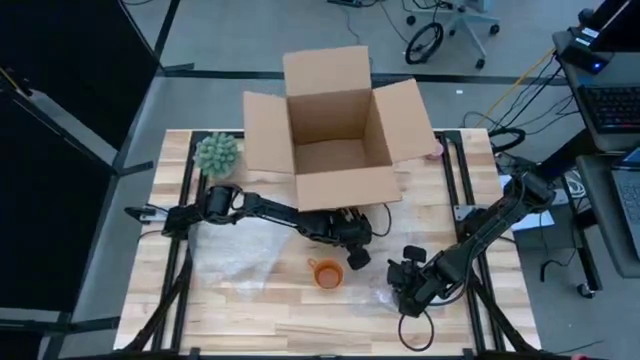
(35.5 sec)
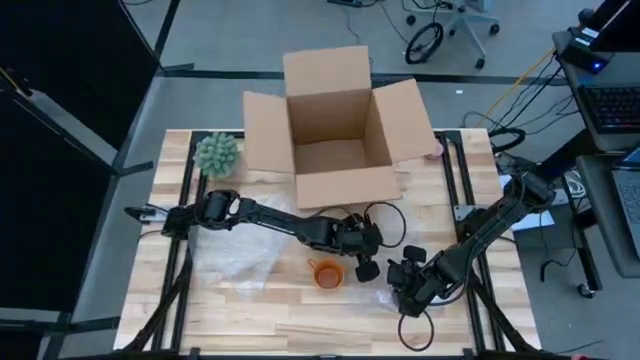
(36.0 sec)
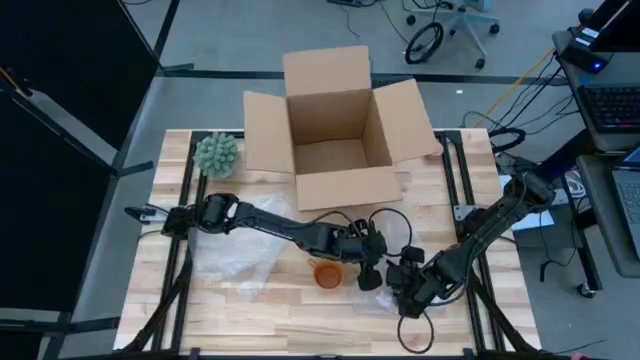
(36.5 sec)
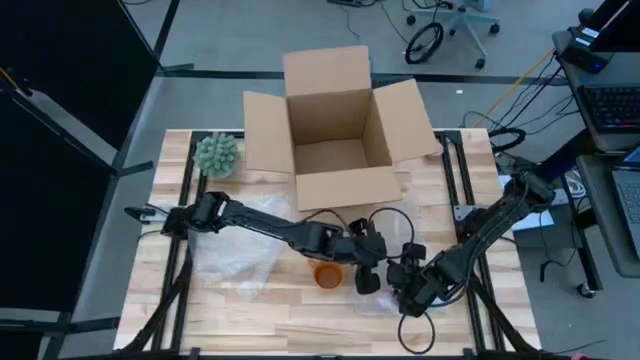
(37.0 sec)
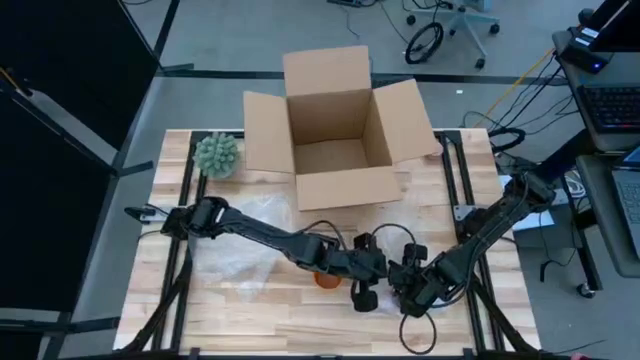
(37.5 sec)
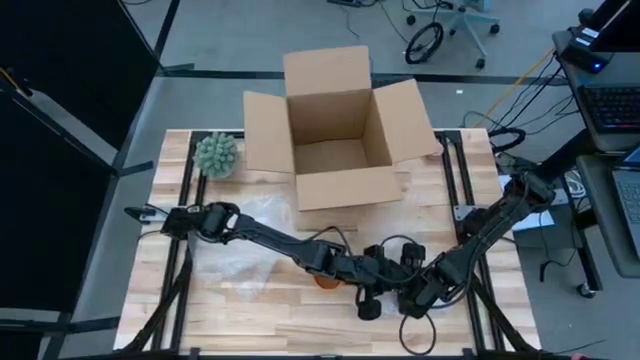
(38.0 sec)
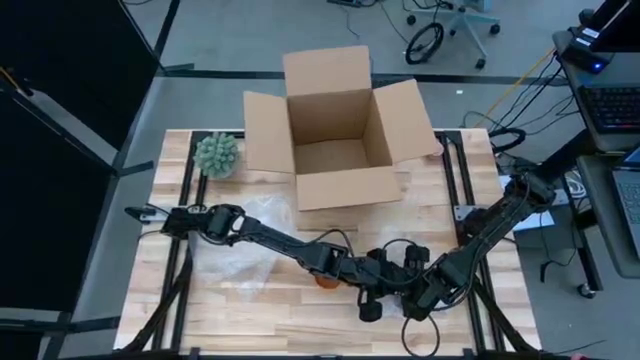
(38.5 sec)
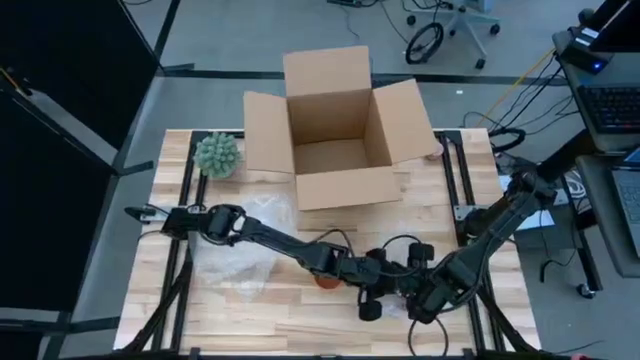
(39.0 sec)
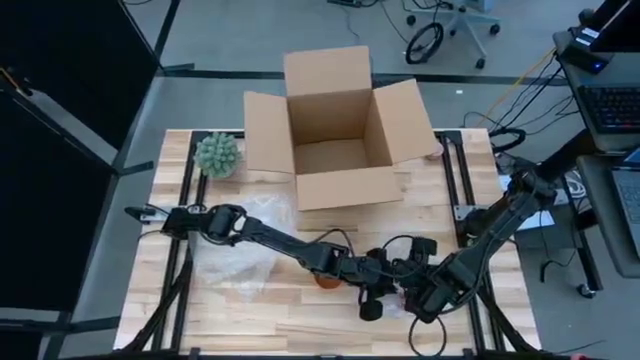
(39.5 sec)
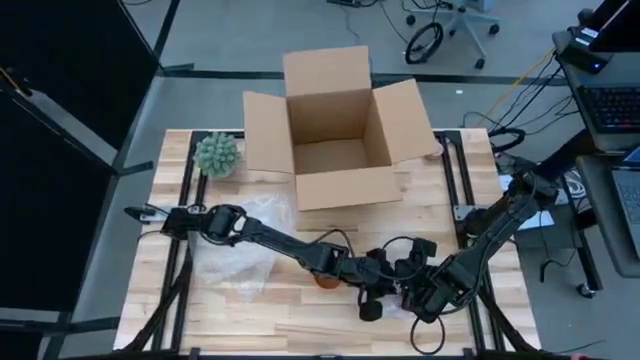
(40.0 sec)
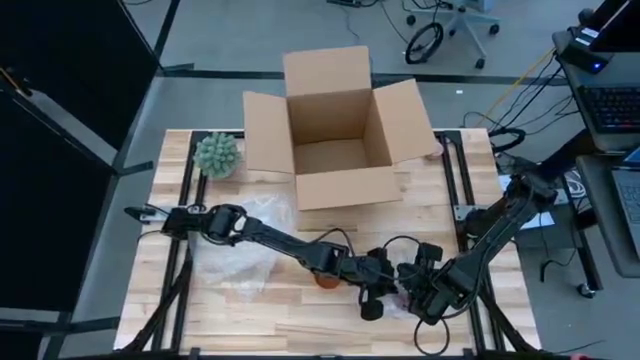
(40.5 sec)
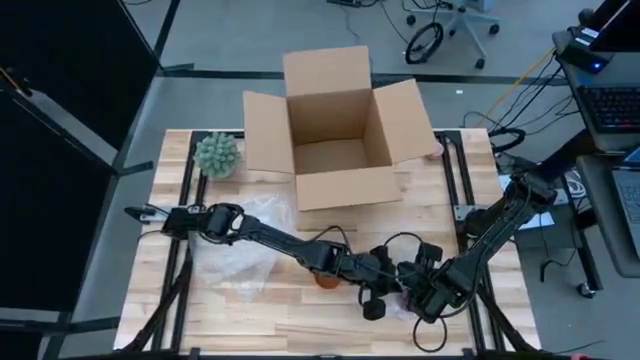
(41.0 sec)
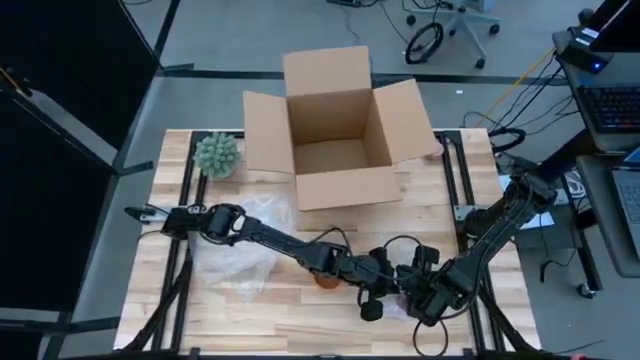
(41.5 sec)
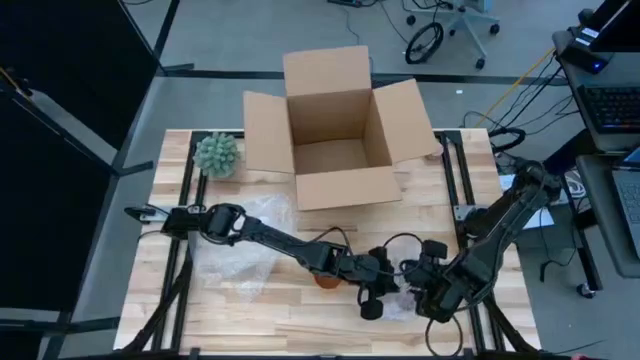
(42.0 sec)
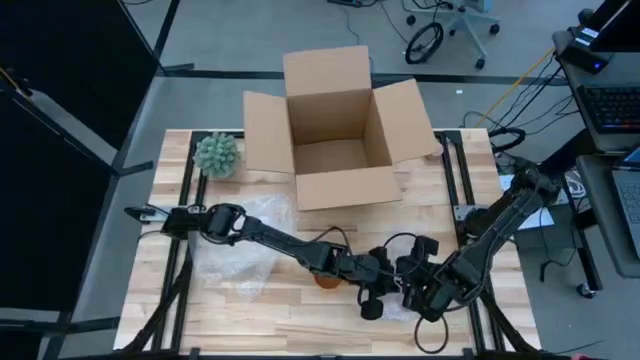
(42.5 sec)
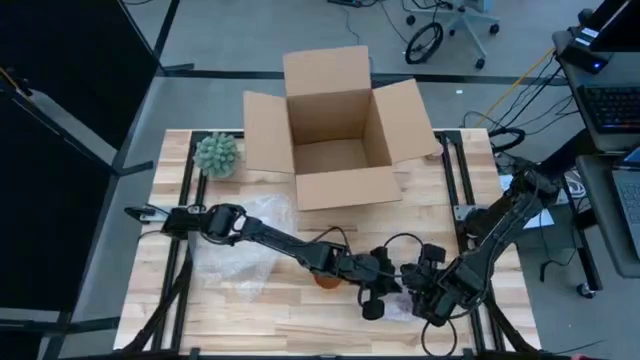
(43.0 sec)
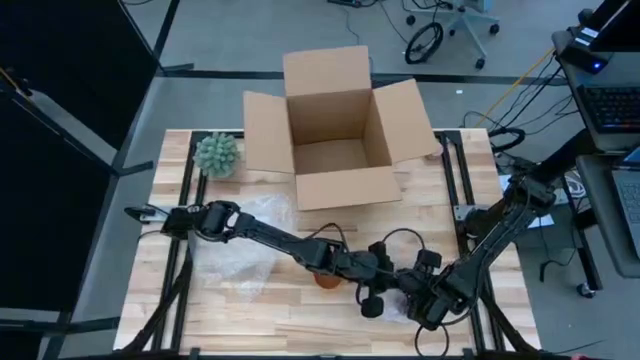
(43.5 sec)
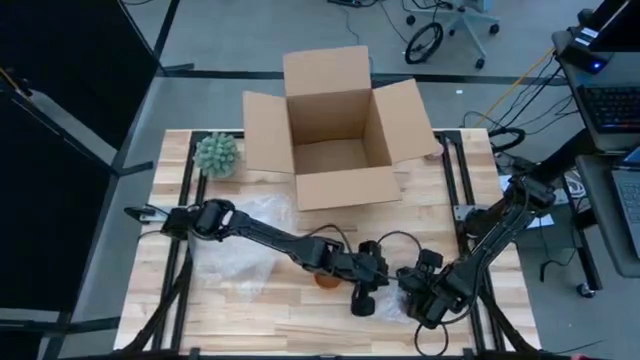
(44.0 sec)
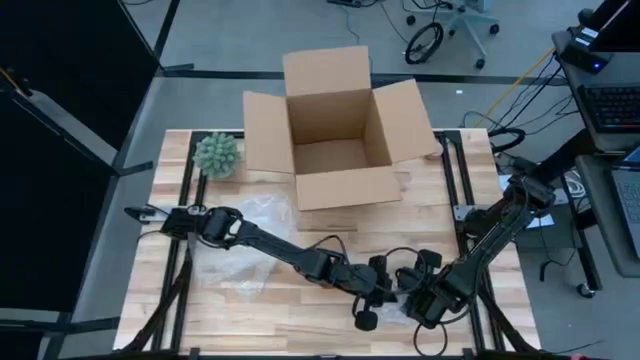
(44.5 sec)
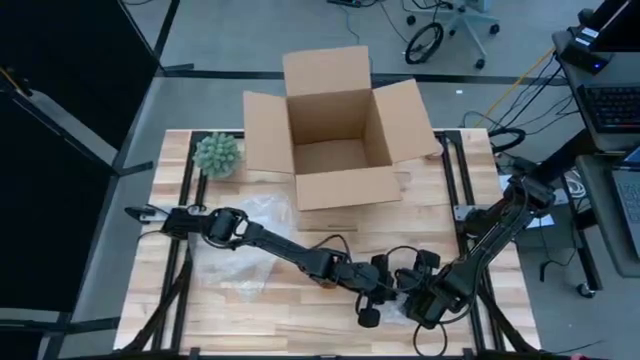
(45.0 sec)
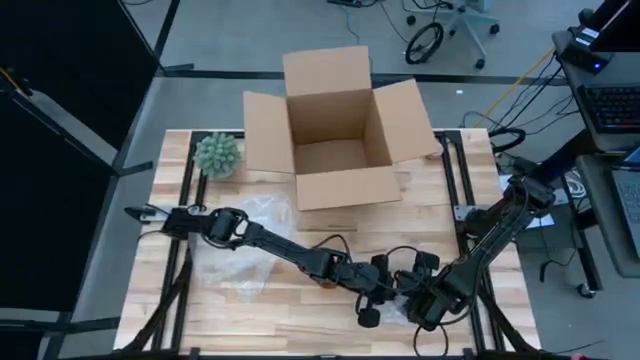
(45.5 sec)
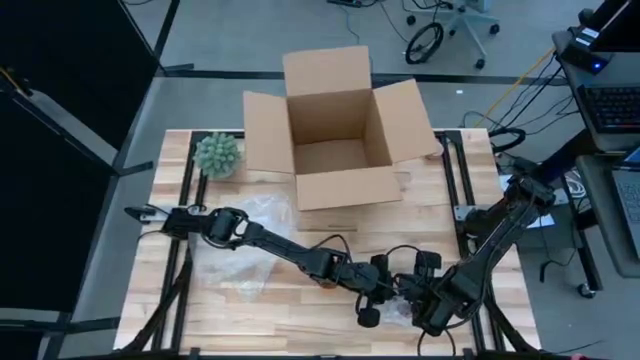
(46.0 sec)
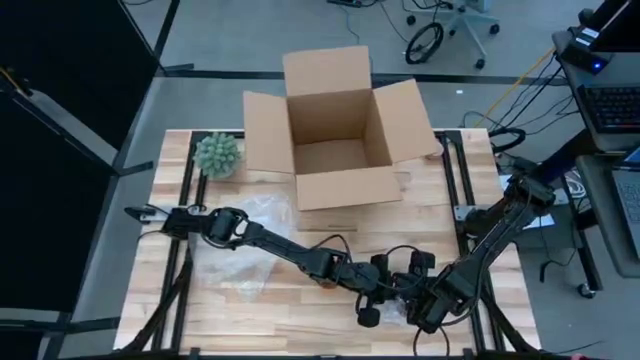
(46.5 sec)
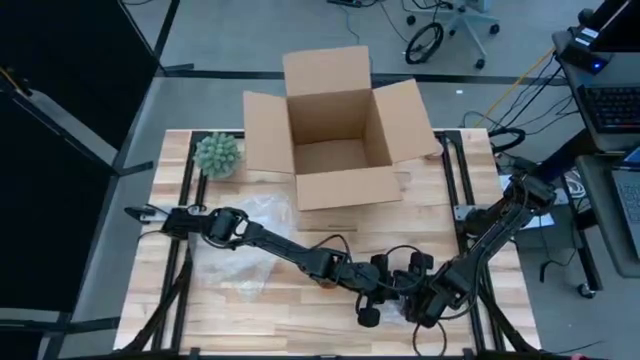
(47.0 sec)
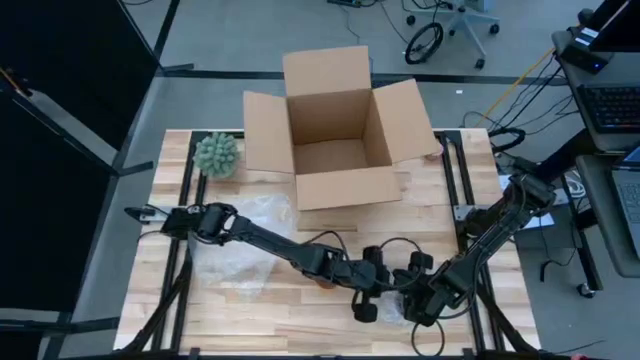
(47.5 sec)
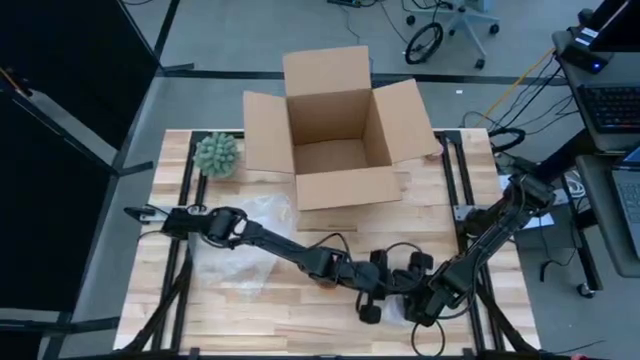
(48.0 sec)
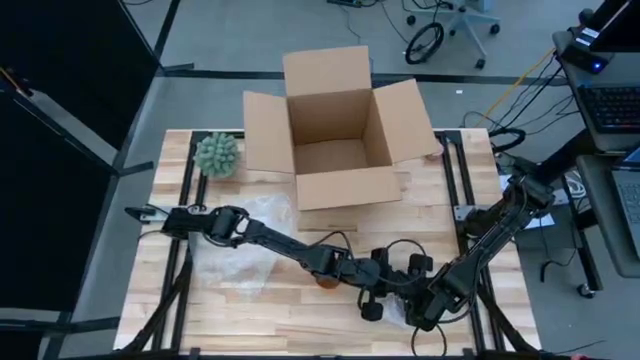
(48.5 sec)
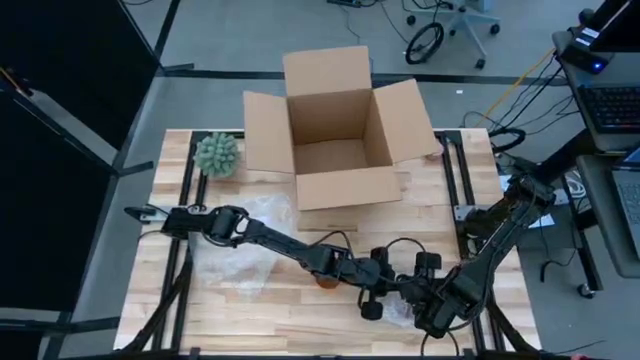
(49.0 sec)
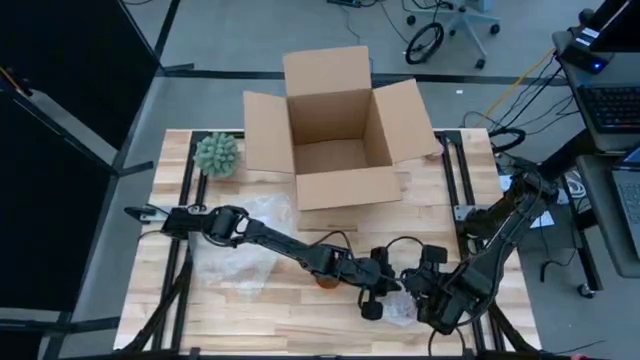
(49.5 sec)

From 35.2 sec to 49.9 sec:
Task: wrap mug
Wrap the pink mug with the right bubble wrap

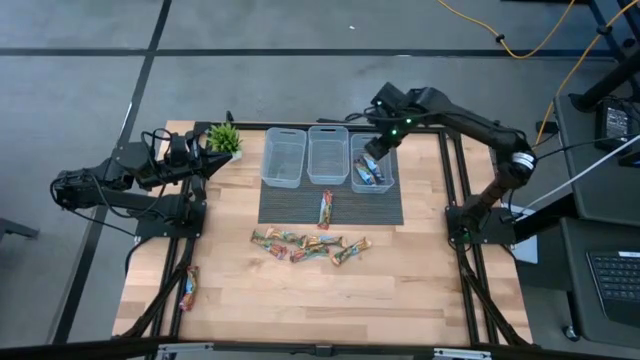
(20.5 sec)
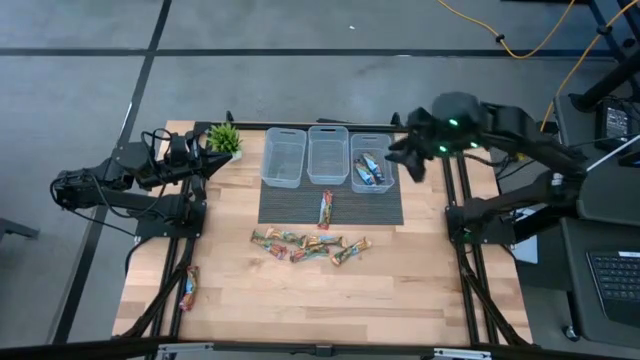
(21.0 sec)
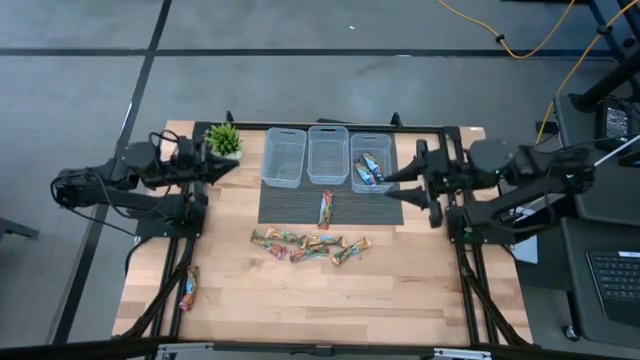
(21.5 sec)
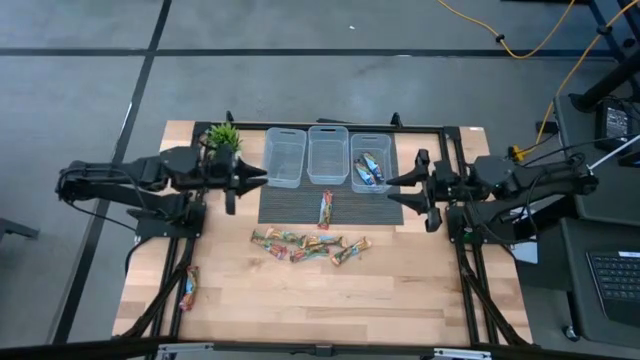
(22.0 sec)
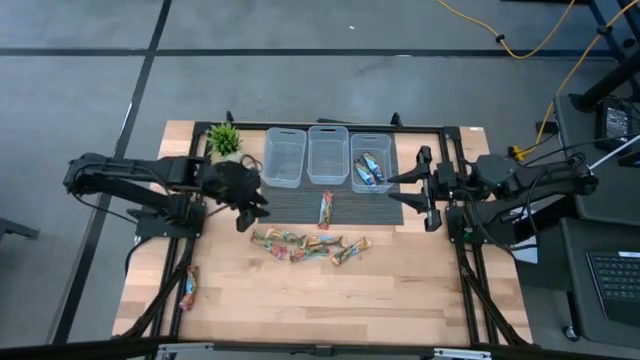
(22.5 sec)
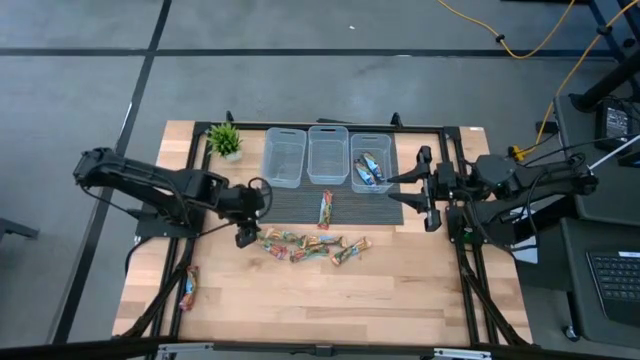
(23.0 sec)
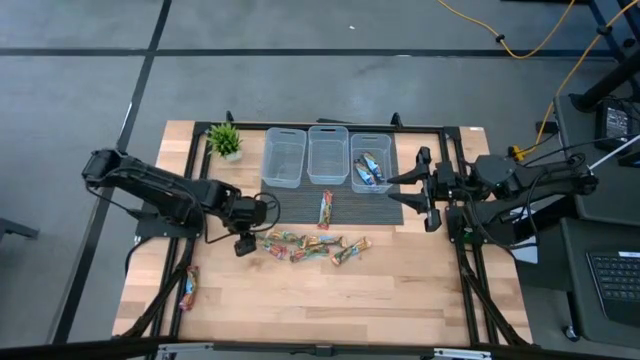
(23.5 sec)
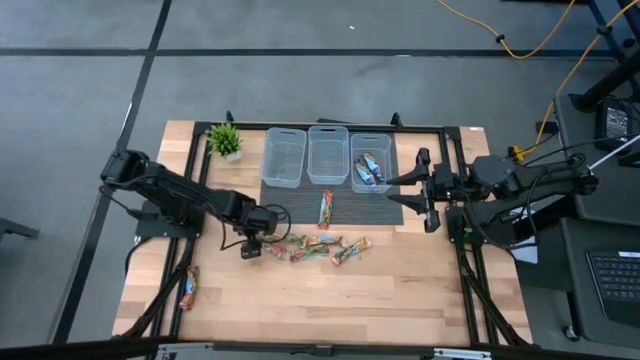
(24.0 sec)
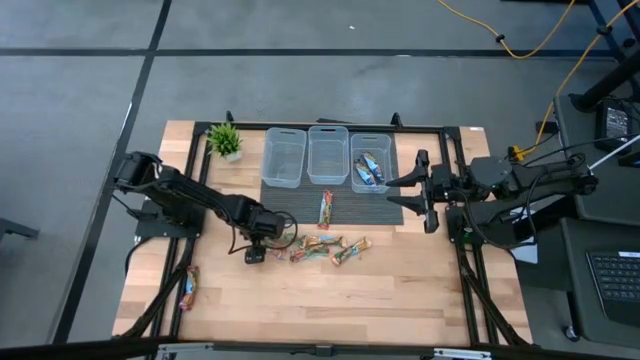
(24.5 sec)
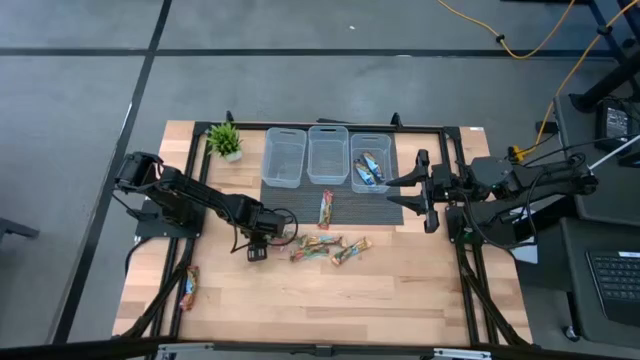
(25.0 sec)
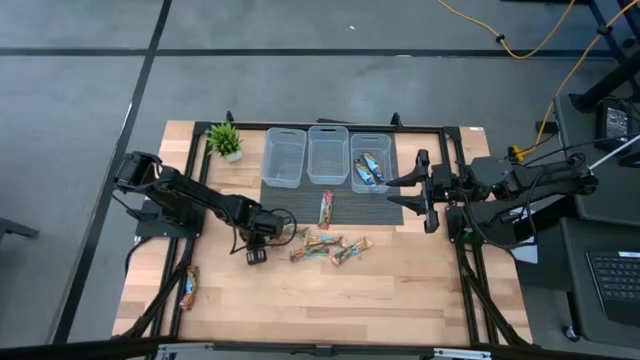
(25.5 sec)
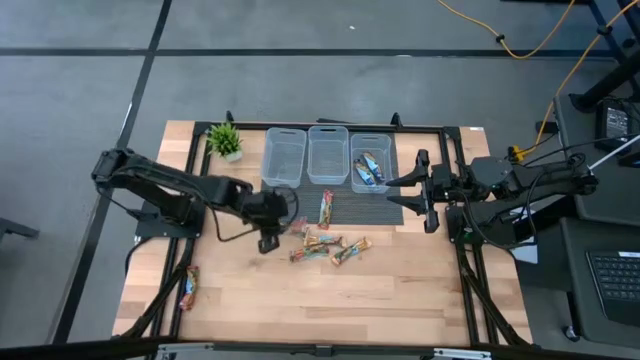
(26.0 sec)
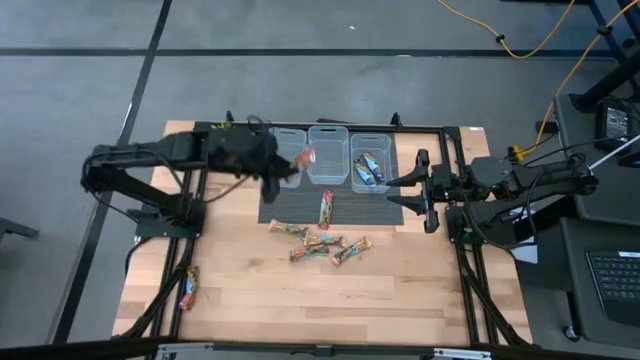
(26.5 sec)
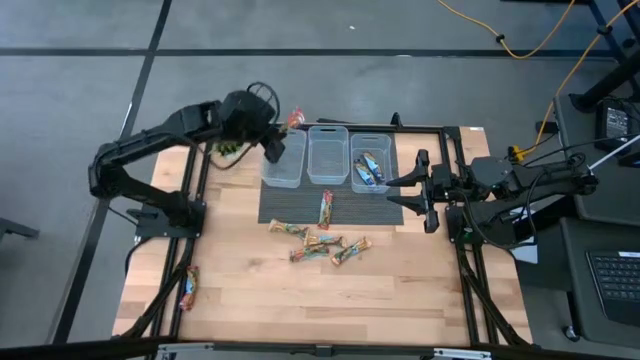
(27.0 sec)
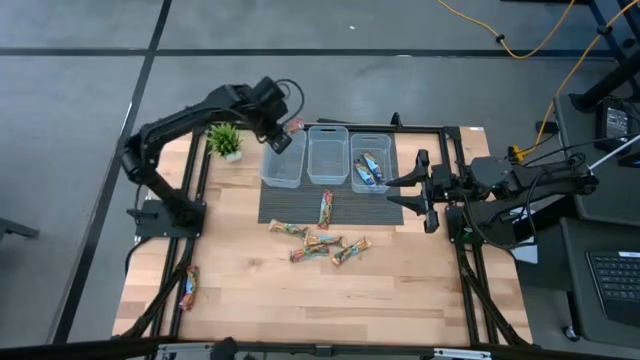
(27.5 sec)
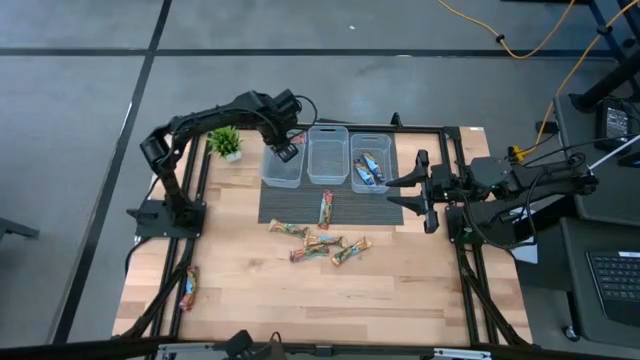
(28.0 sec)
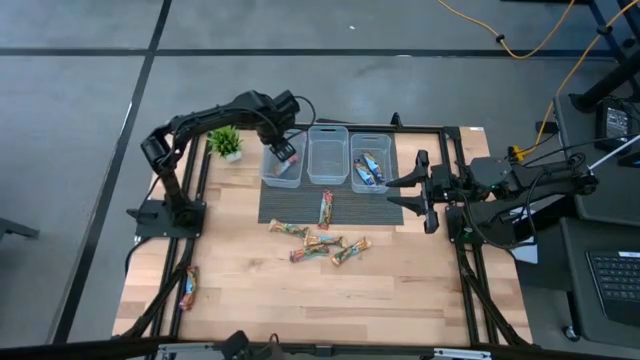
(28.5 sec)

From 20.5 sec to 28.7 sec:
Task: Pick and place Granola Bars by type
Put the left red snack bar into the left transparent bin
